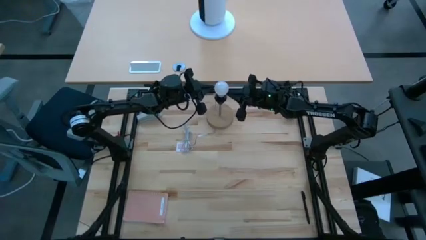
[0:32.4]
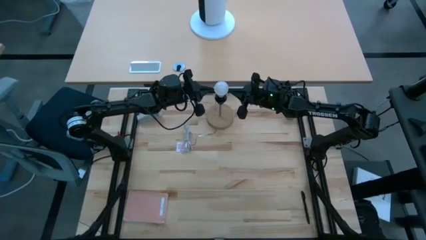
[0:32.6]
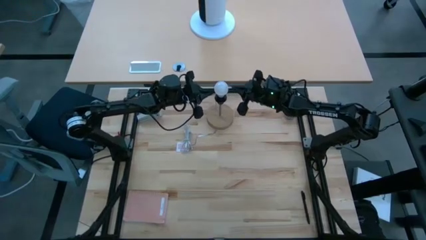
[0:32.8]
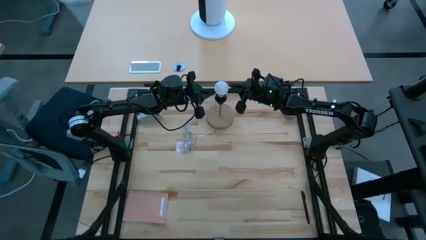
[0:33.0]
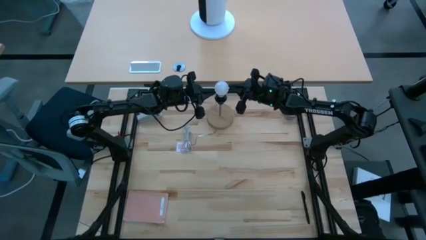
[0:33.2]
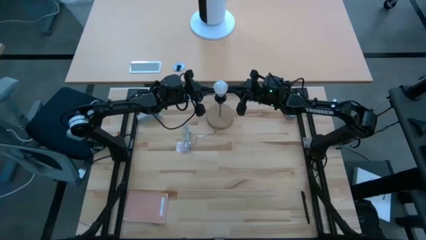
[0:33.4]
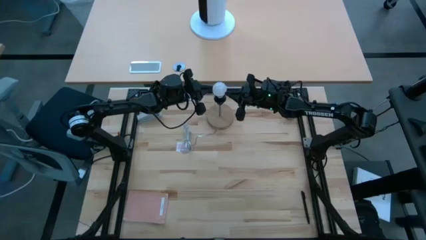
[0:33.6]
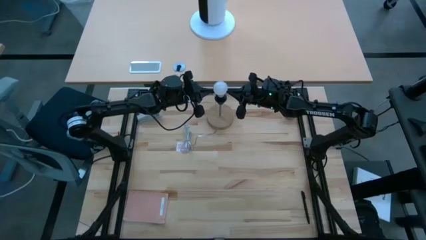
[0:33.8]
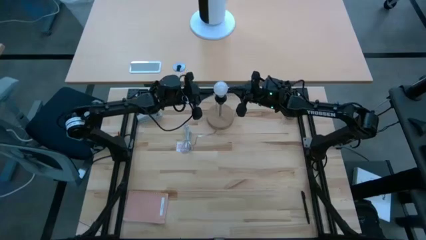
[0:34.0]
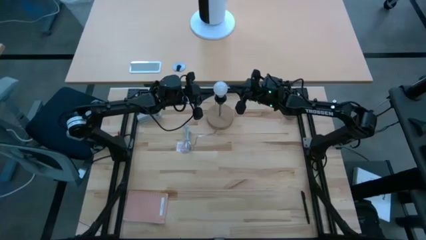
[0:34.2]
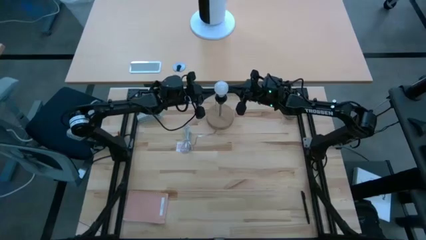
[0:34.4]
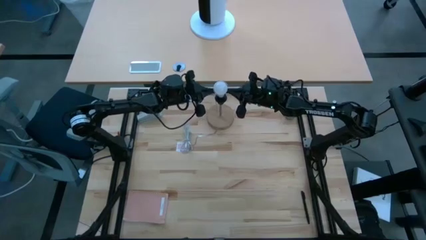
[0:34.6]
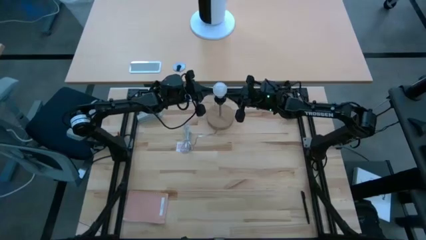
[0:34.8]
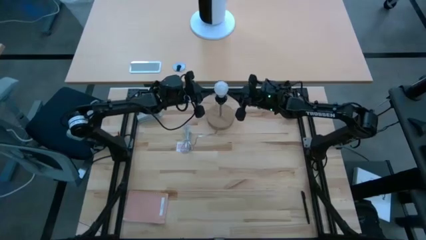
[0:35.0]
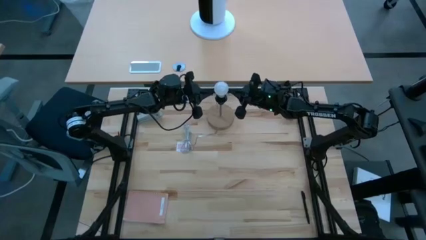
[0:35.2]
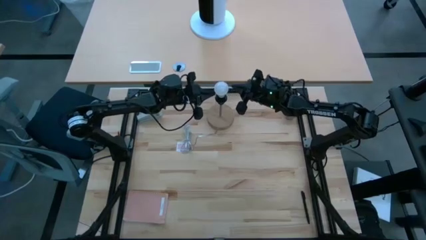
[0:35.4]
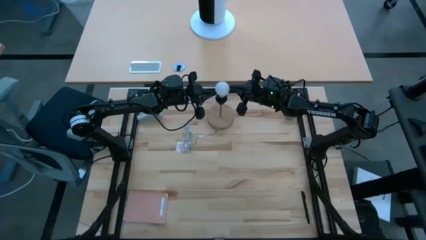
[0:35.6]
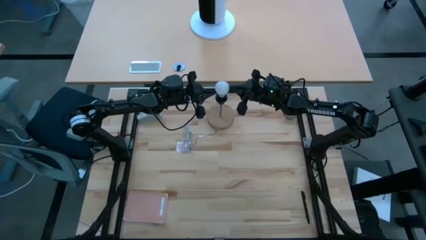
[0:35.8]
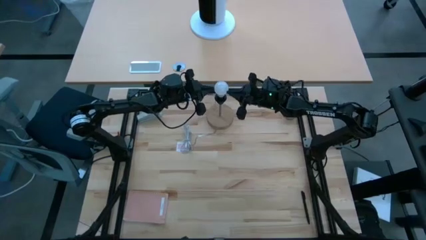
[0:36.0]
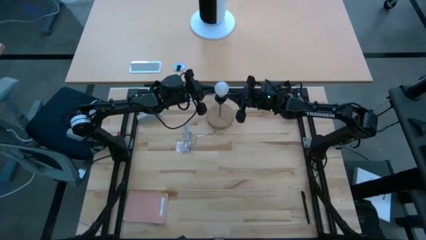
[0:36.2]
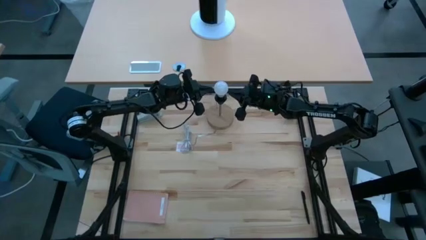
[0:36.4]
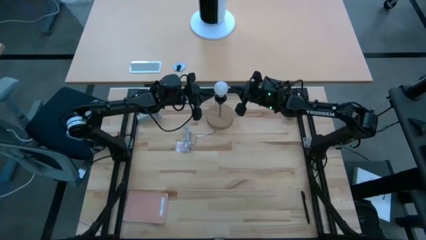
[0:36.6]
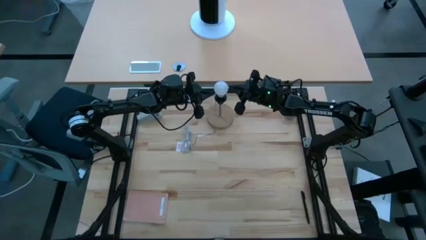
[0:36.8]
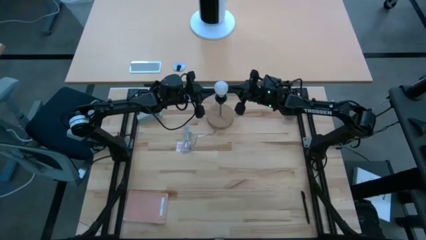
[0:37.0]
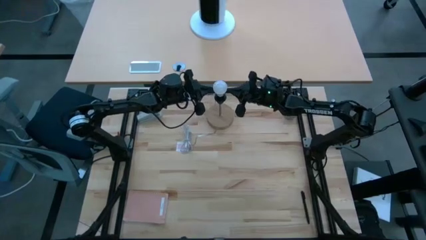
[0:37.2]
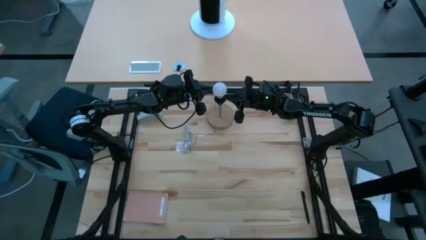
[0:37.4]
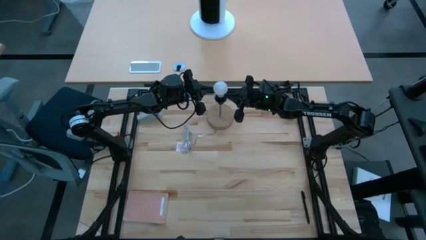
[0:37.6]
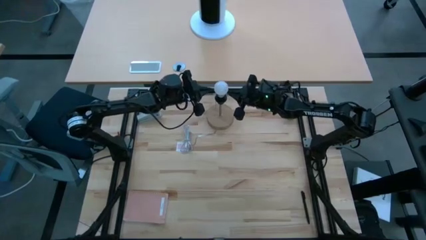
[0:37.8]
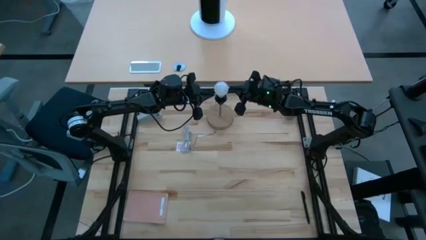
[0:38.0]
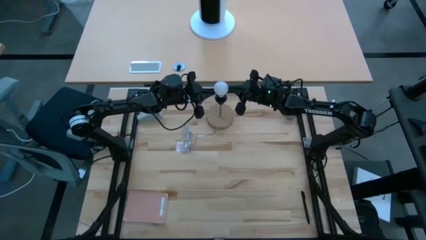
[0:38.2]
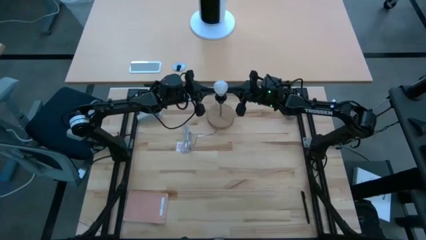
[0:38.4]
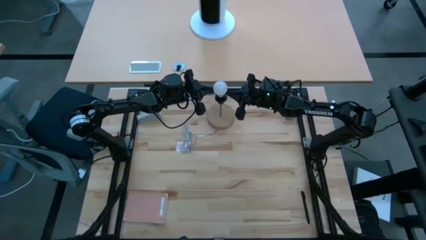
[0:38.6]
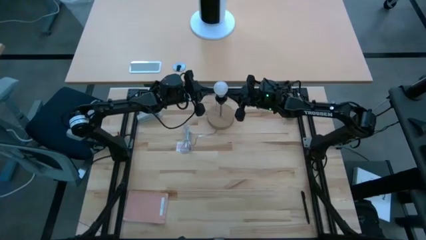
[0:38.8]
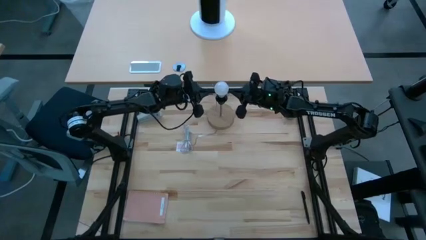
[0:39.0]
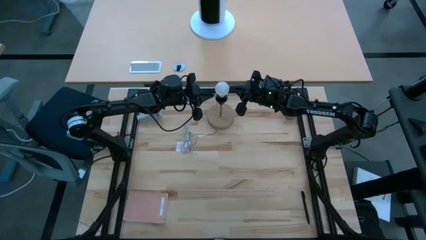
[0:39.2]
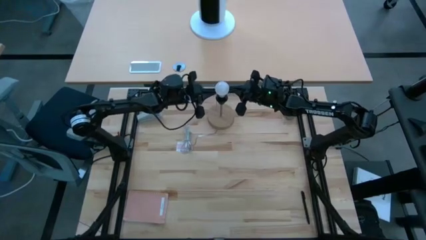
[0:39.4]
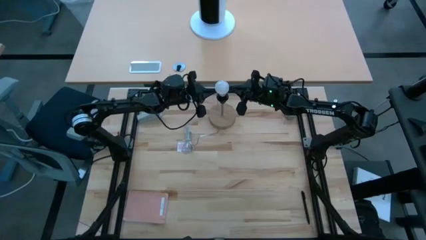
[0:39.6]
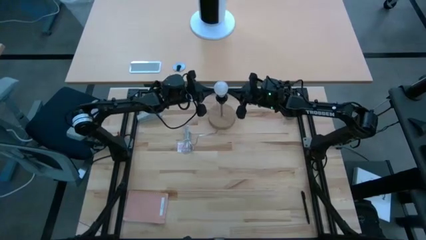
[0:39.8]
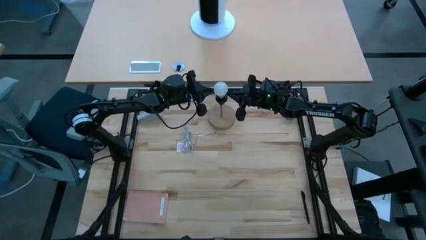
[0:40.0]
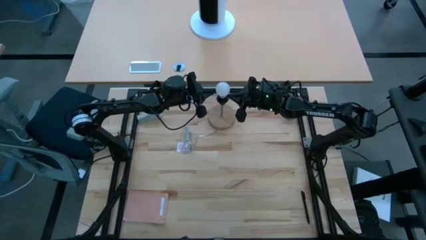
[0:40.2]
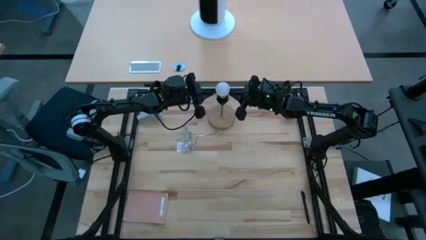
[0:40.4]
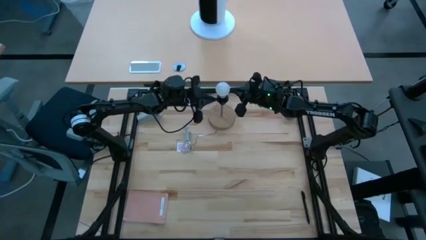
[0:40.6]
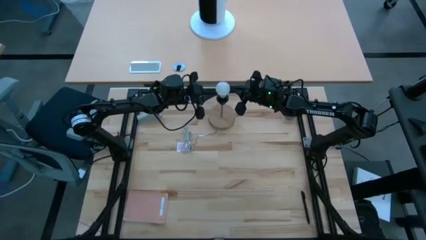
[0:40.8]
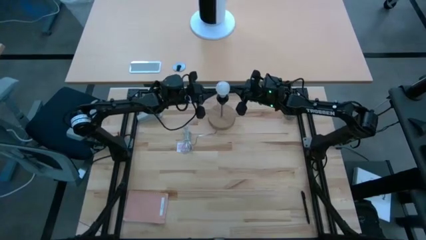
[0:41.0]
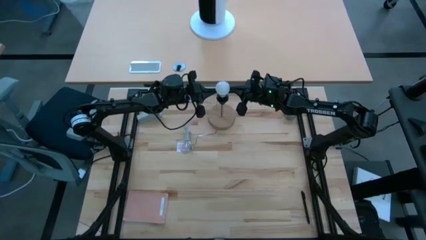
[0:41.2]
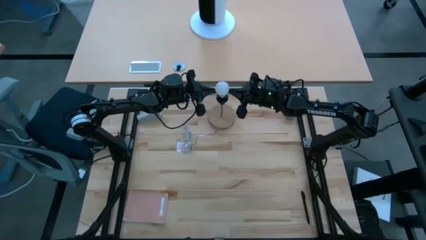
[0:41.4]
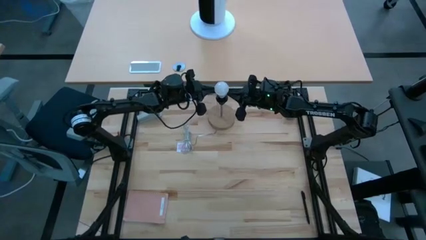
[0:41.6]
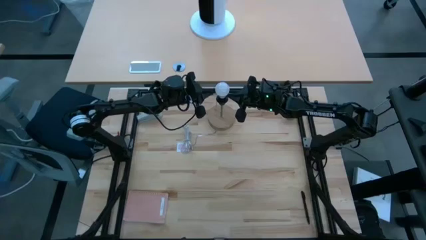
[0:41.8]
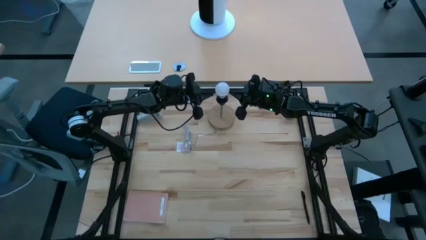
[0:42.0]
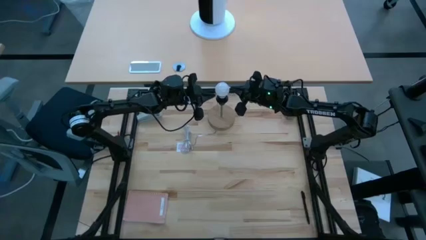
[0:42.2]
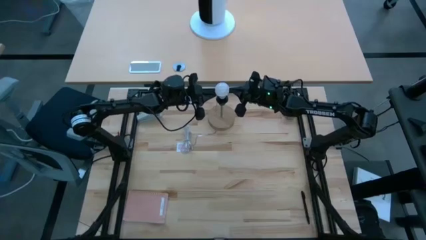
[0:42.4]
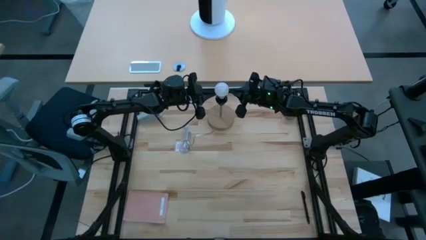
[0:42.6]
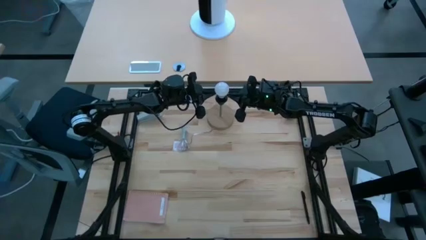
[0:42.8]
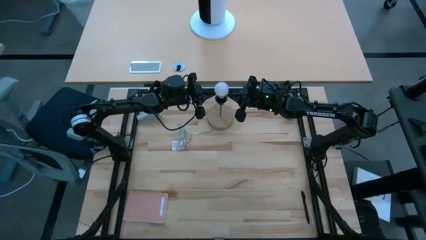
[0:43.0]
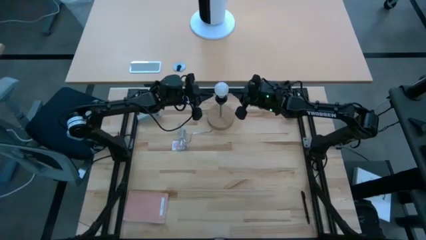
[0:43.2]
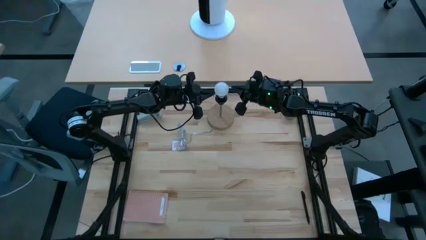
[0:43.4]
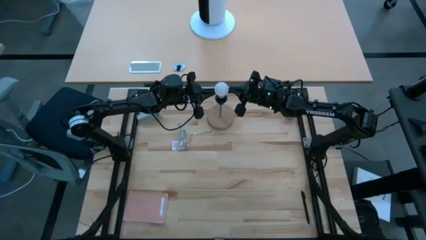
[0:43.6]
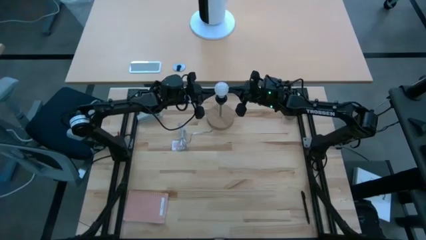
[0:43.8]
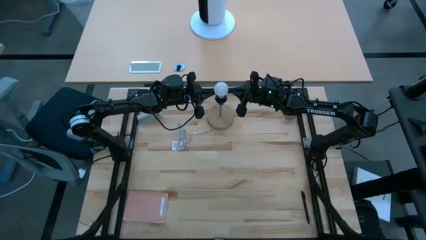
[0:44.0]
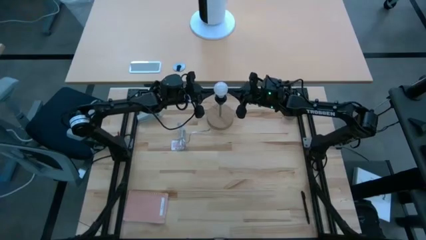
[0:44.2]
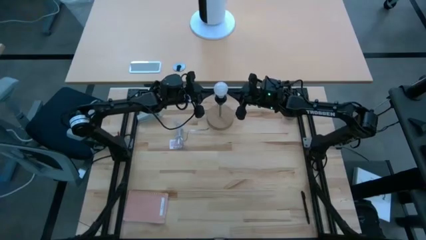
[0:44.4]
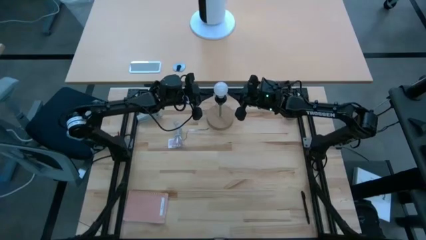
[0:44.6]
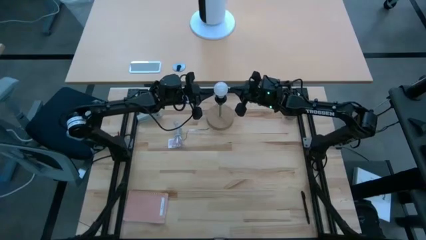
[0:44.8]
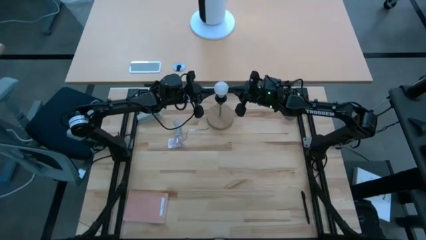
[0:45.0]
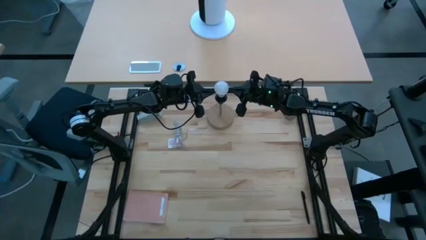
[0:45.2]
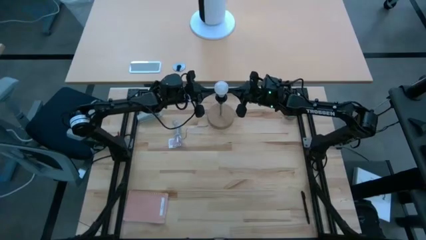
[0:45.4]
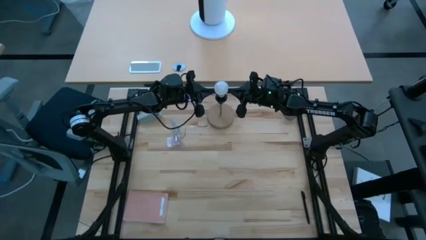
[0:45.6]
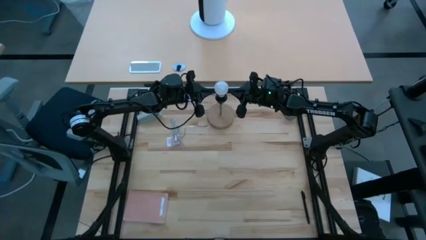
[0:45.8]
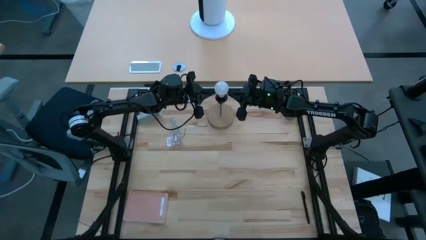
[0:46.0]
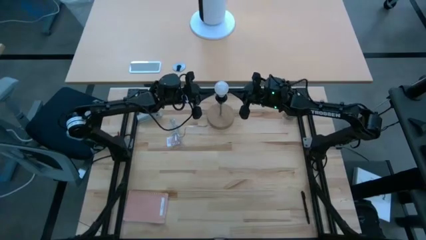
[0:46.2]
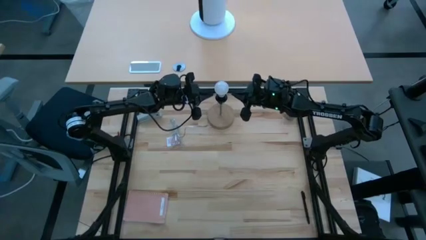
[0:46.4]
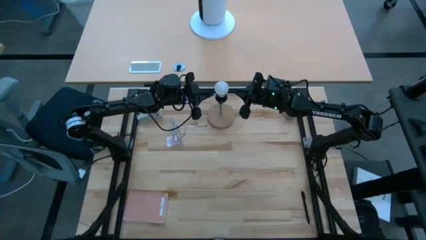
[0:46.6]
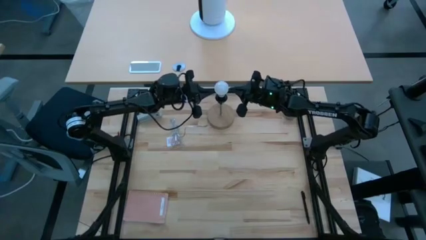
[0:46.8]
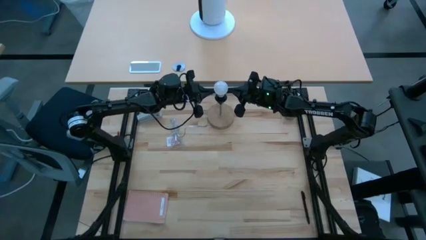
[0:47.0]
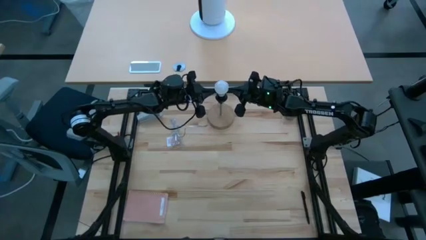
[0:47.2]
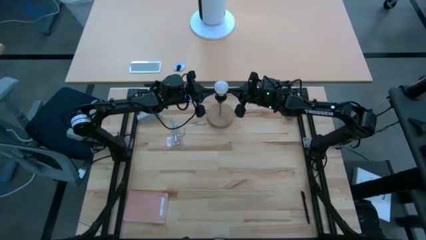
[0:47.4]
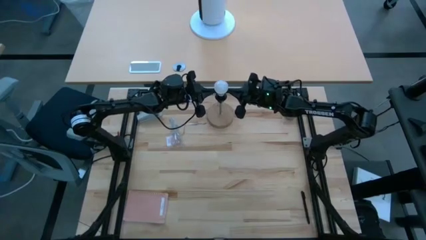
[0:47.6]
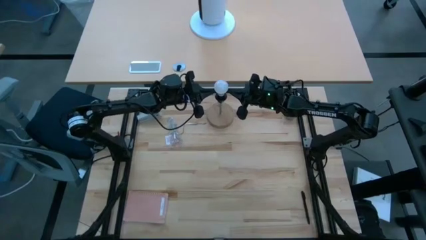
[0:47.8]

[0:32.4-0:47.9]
Task: Screw lightbulb
Insert the lightbulb into the desk lamp
